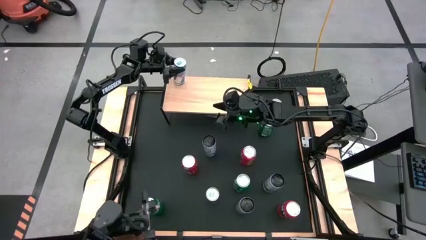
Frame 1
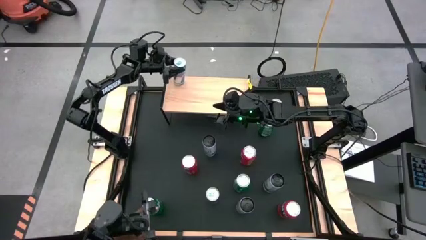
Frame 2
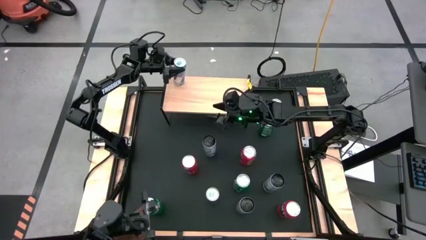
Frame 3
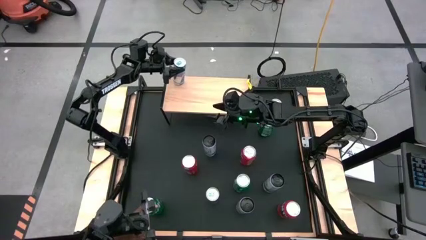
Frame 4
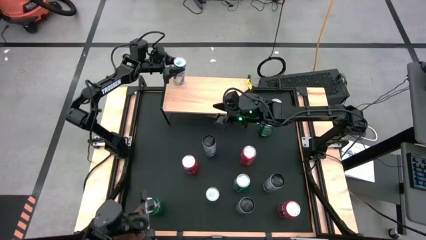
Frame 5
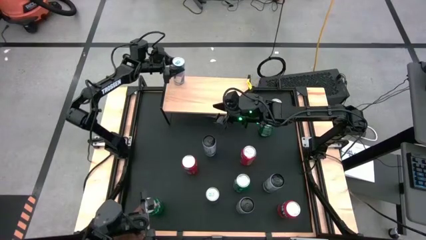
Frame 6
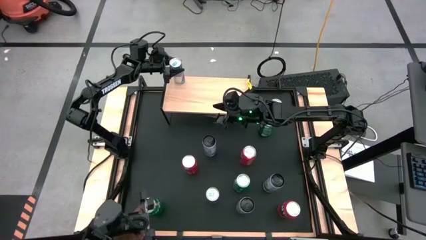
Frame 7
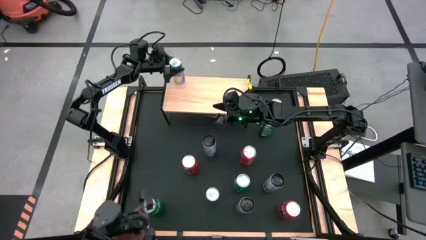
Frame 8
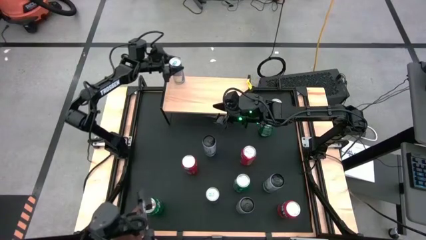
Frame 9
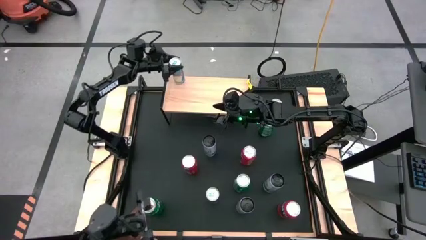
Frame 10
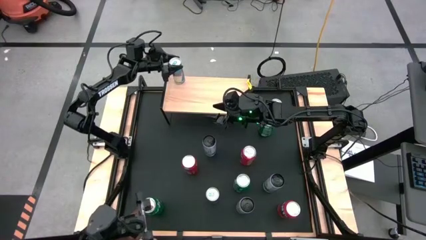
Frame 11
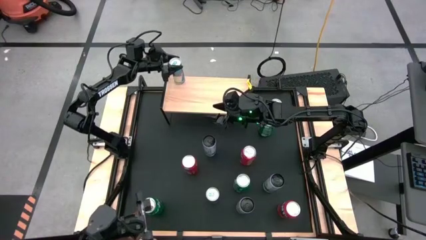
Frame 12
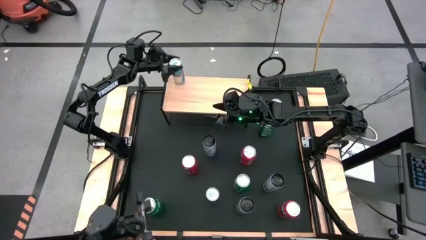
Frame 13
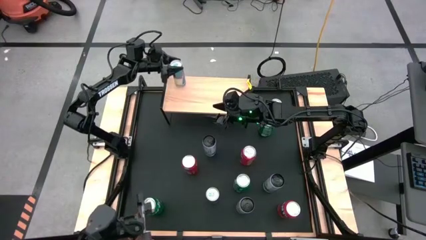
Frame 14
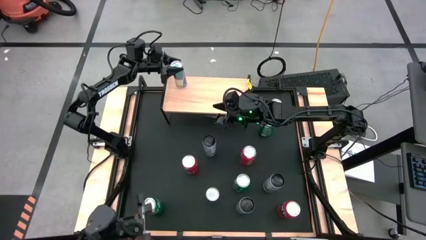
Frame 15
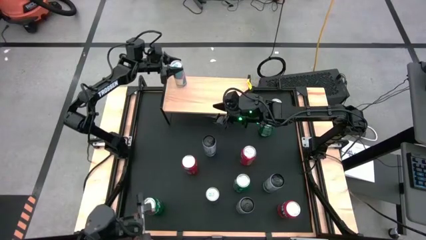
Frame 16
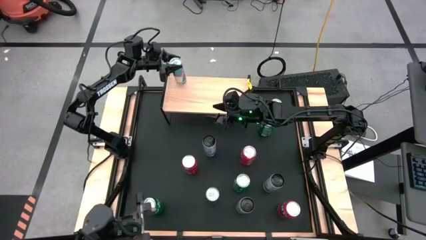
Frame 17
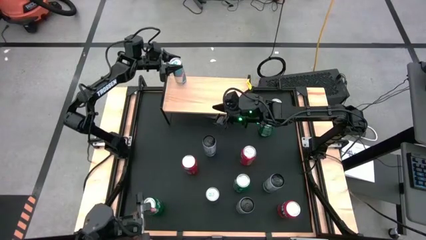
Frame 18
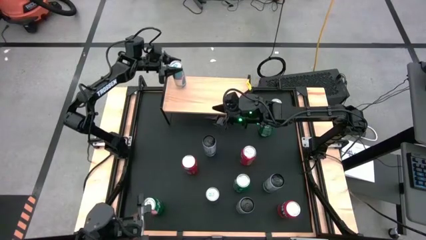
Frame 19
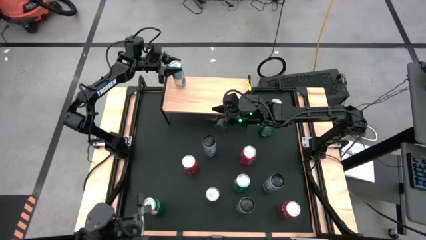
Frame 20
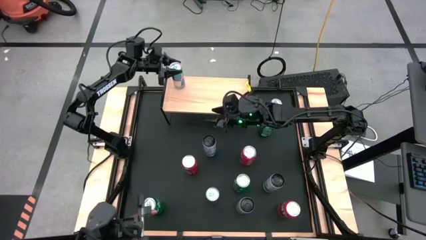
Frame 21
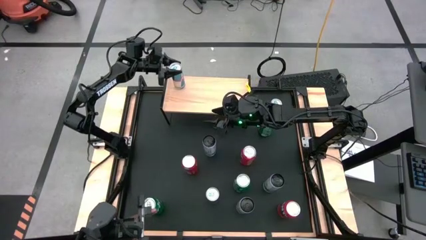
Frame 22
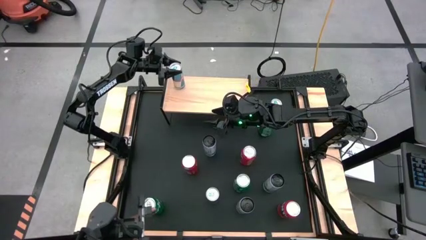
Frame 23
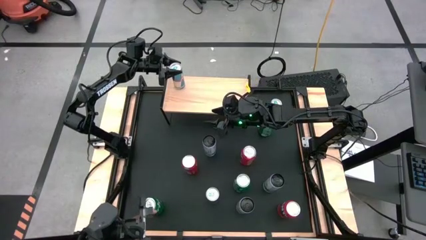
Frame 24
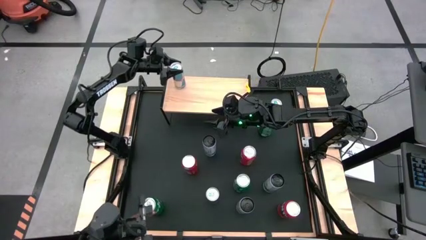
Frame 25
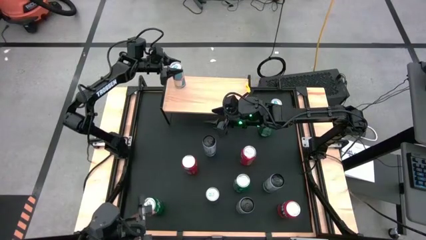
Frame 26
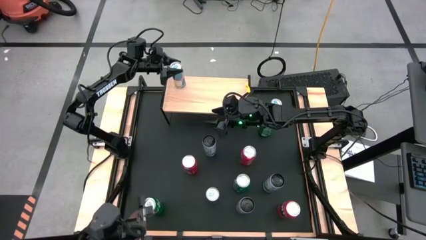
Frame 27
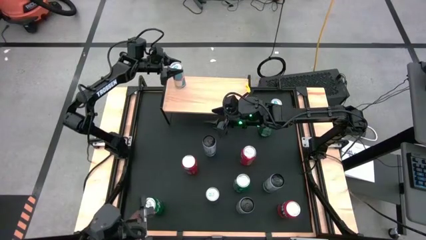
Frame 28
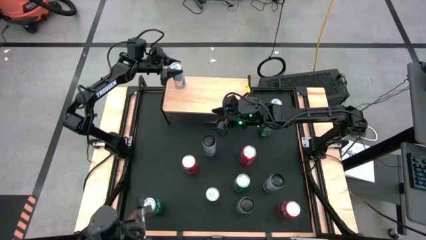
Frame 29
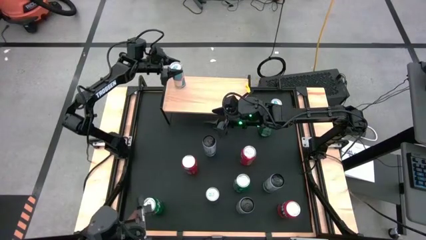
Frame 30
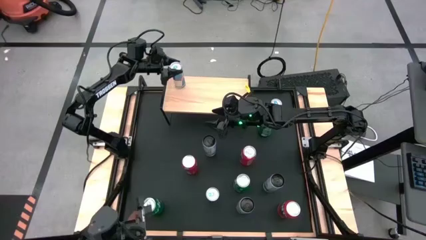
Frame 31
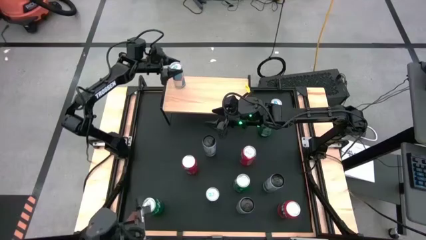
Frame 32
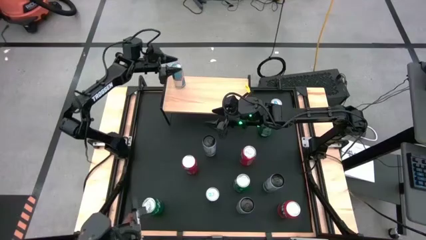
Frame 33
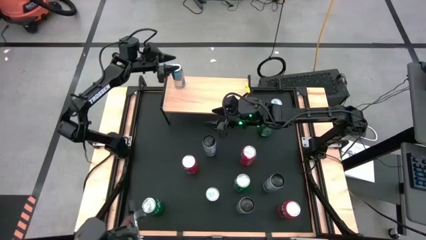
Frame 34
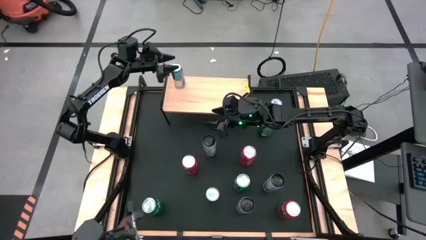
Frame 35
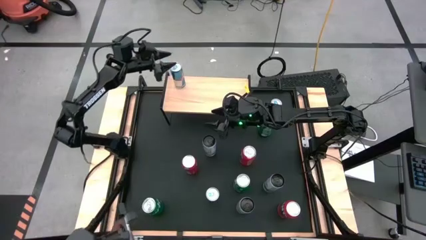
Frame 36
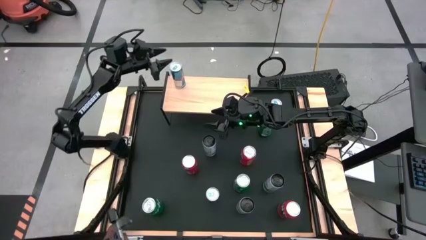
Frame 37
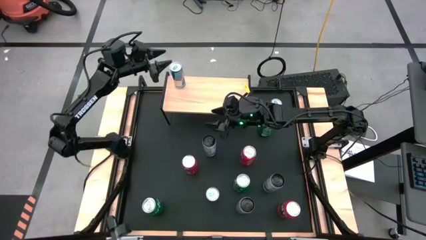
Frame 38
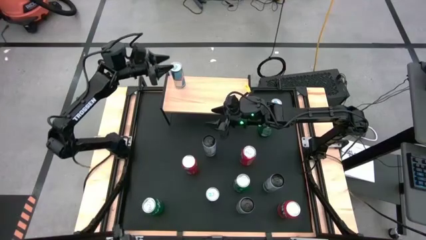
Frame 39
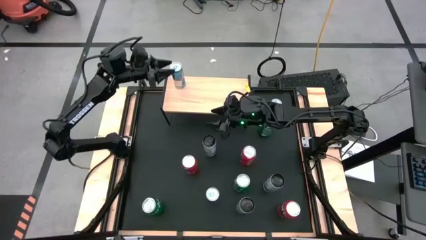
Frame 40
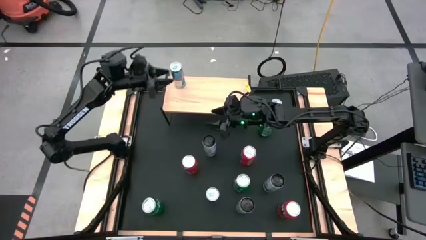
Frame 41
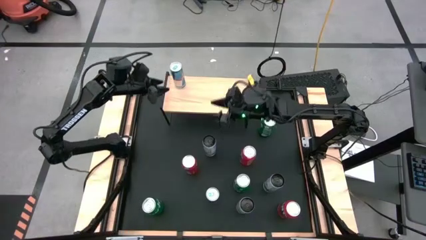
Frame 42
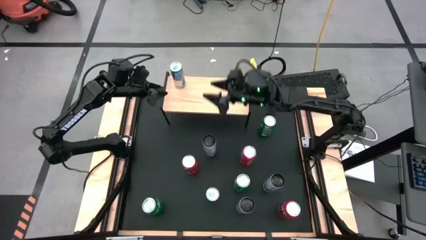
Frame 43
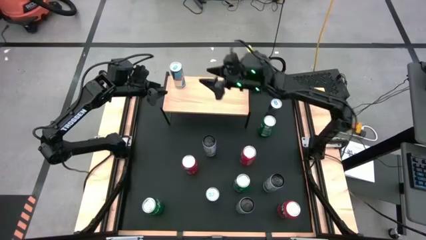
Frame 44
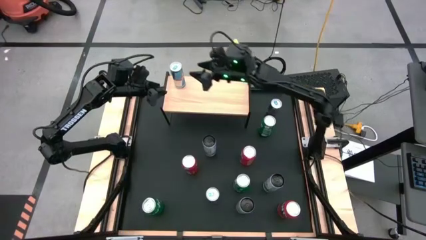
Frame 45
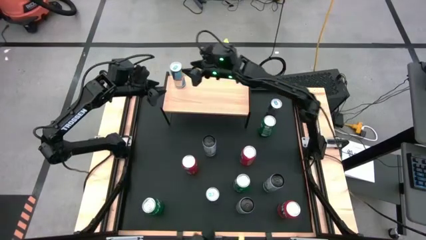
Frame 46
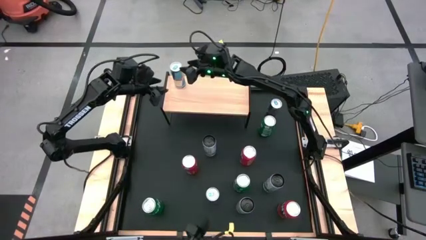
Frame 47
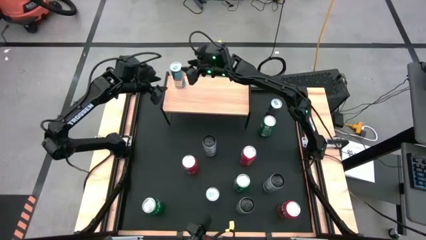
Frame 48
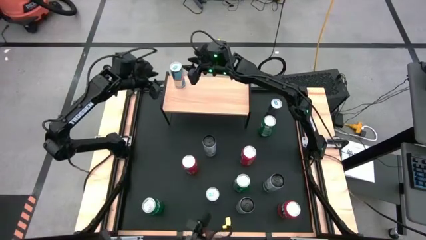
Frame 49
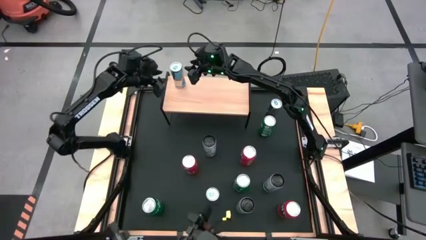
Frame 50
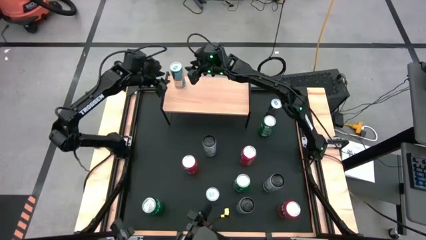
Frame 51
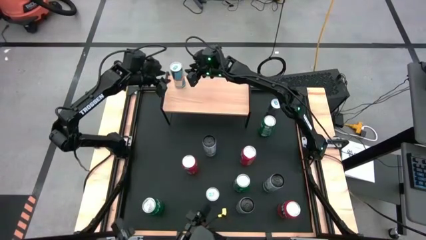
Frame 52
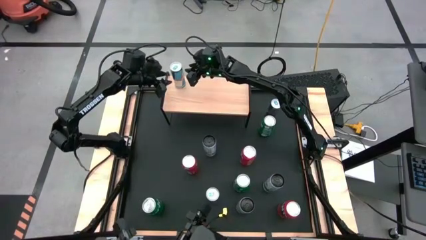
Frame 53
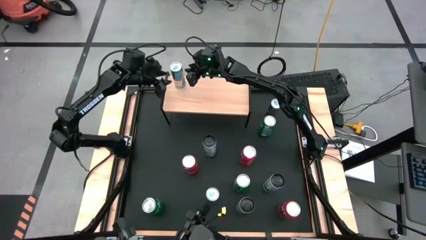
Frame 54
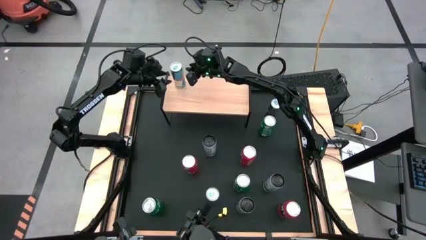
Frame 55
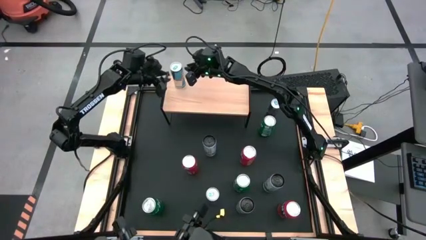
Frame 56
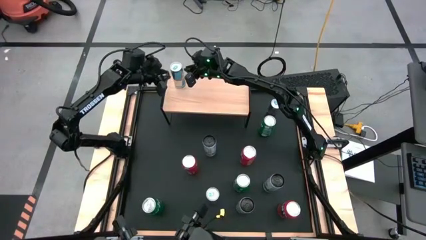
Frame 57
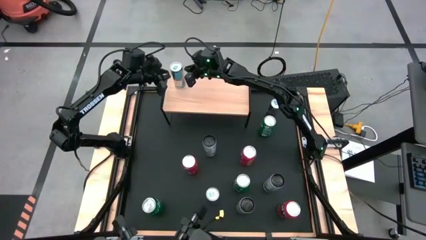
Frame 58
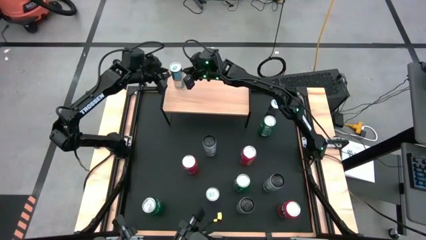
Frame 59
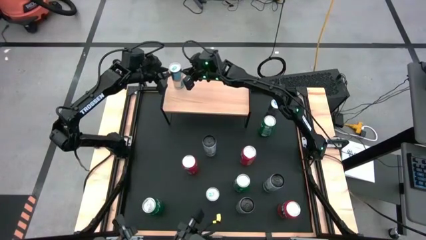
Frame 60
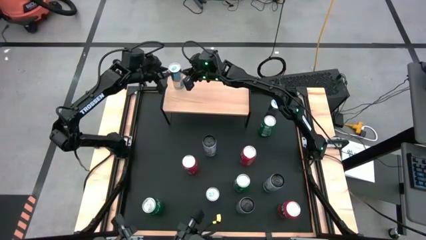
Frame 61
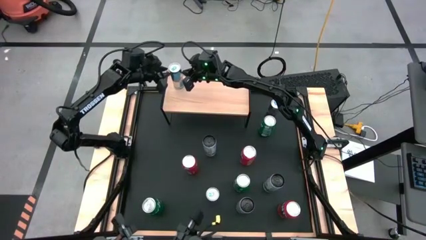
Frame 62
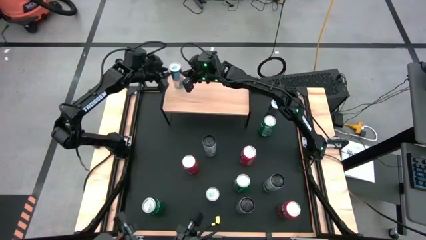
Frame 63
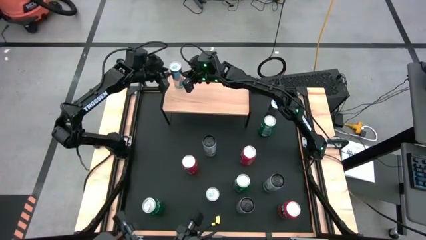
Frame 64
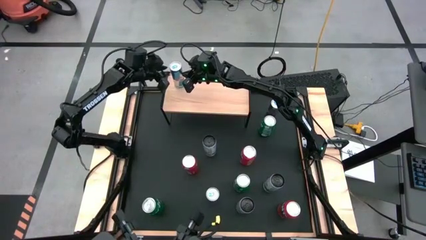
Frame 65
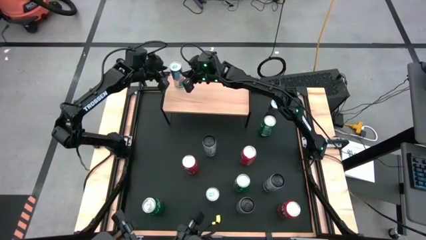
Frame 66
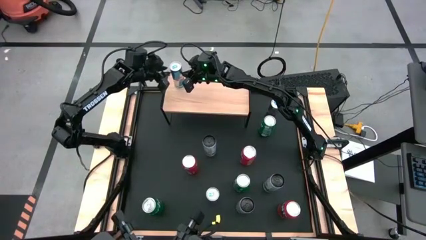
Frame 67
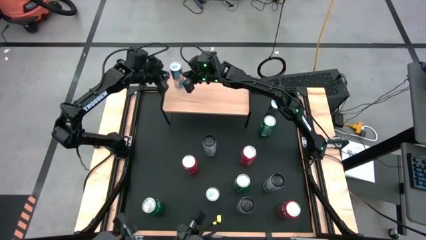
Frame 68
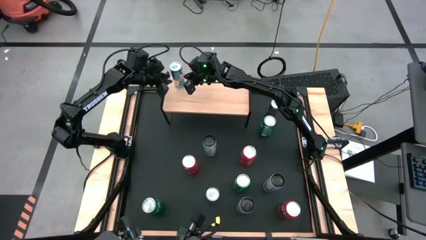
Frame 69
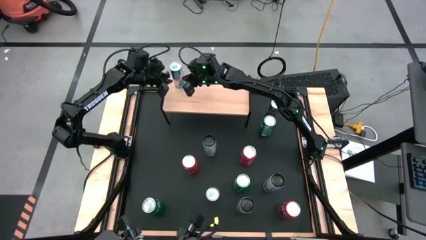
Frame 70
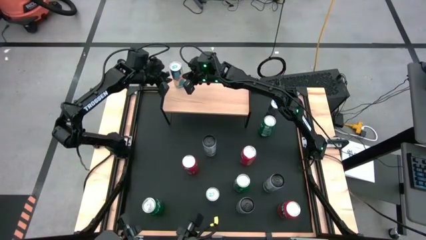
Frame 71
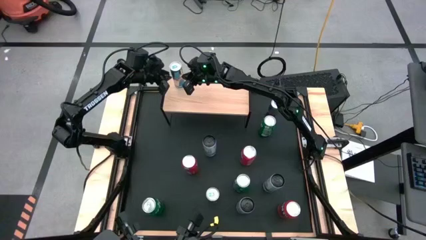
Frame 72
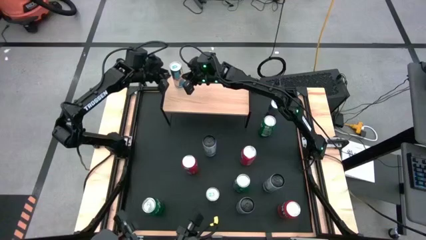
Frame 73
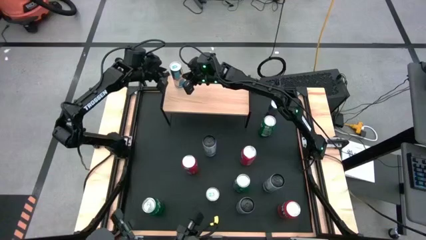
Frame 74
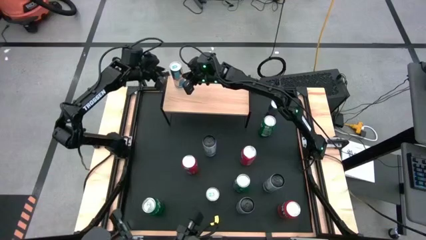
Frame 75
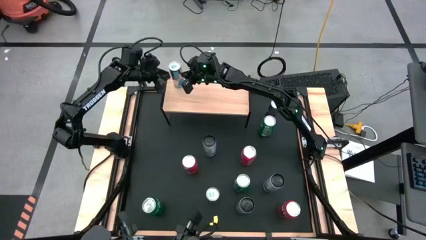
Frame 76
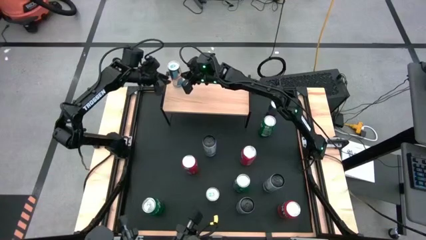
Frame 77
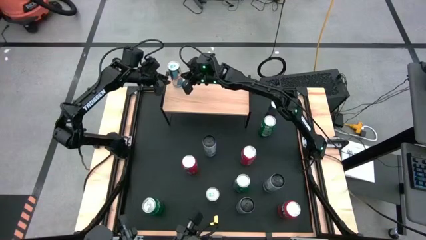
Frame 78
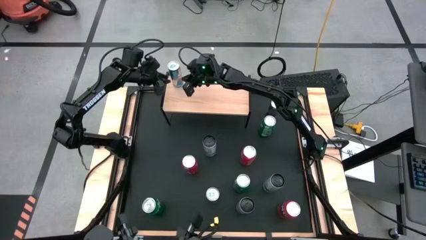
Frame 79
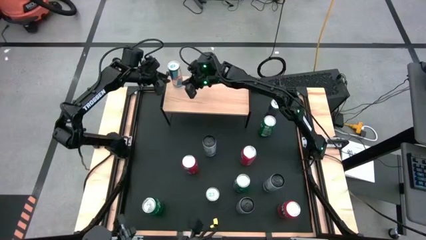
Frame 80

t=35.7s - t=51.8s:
Task: Place canned beverage on shelf
Put the bottom left blue soda can on the shelf
